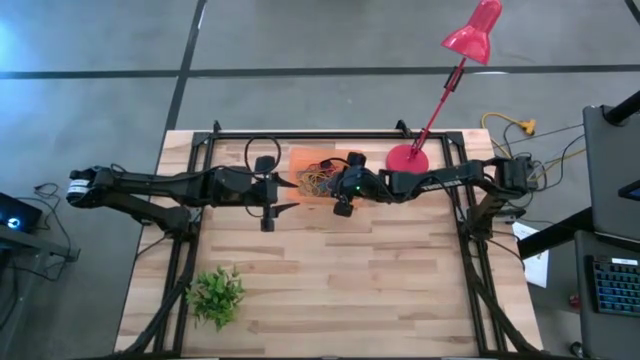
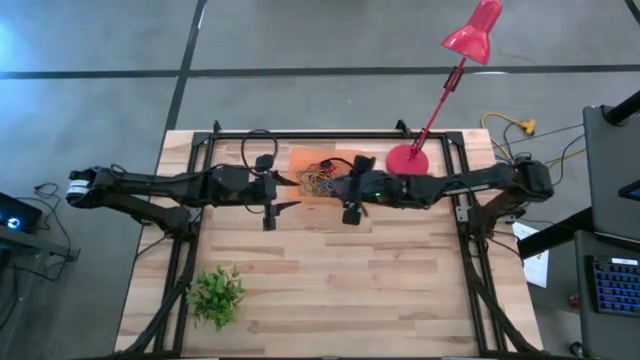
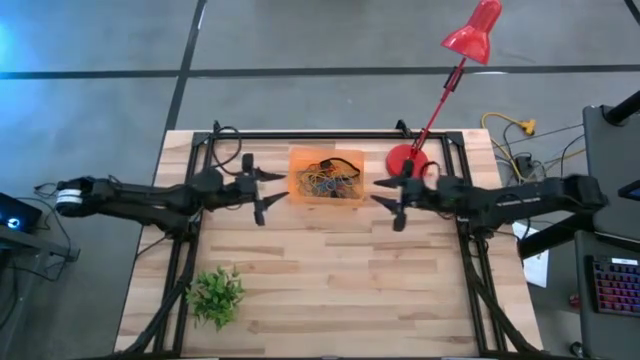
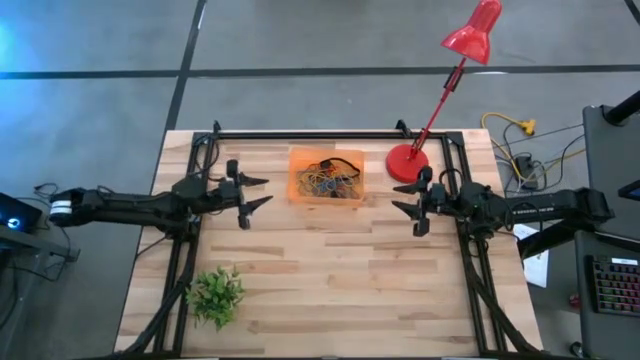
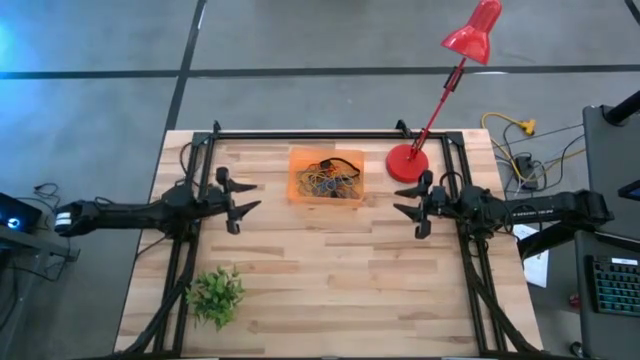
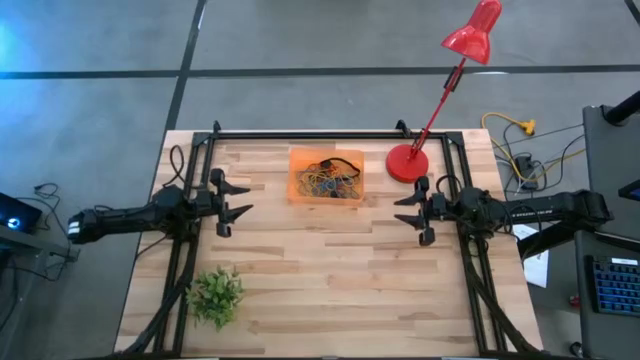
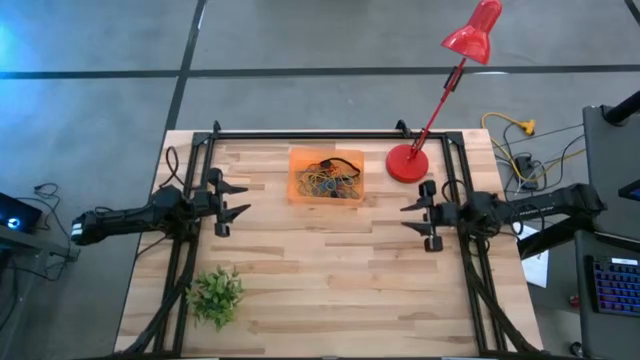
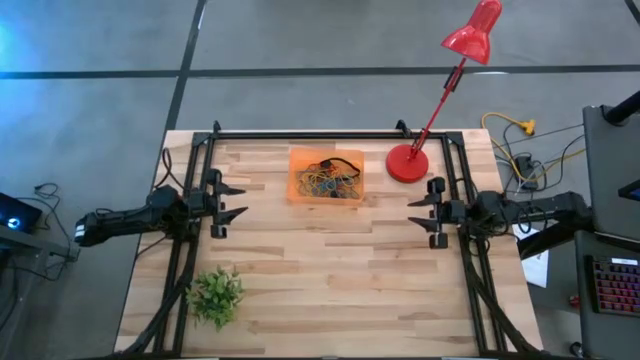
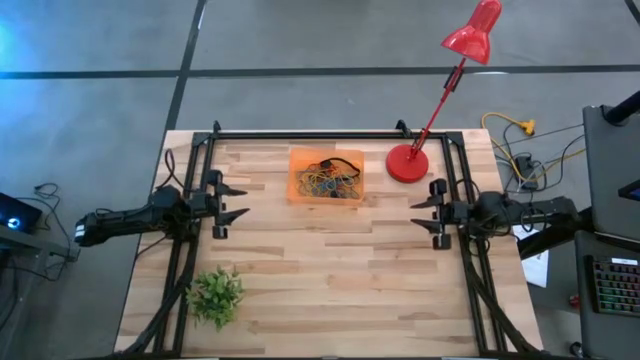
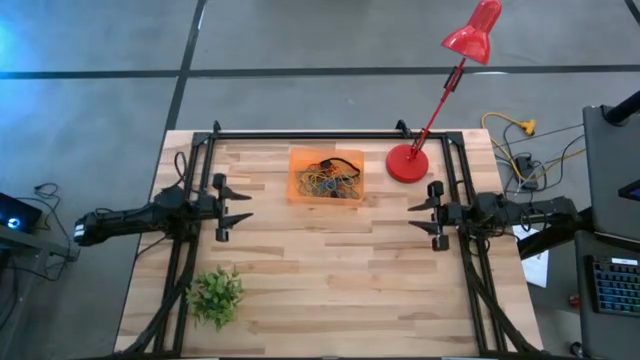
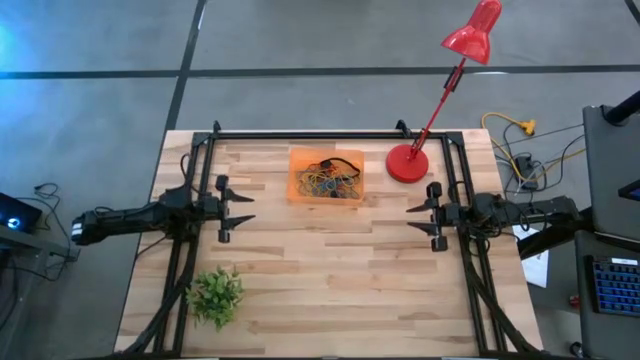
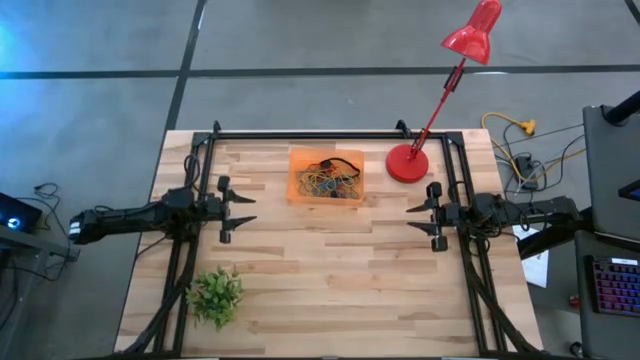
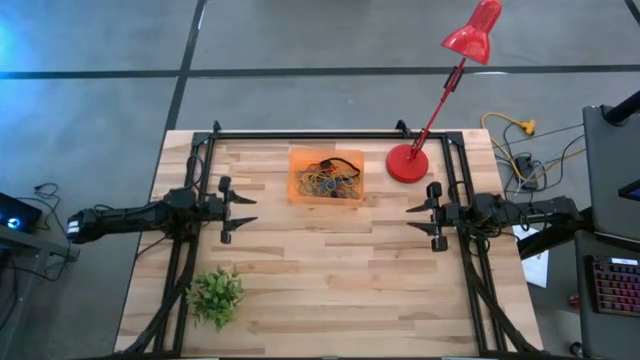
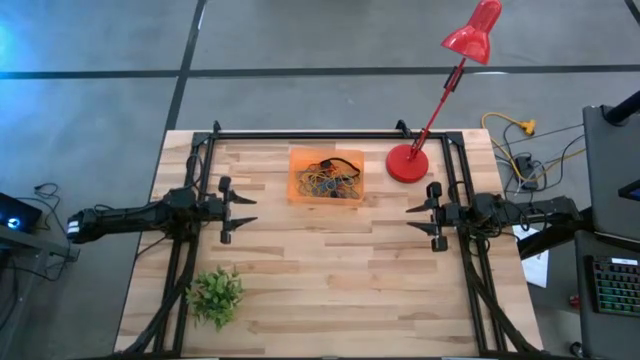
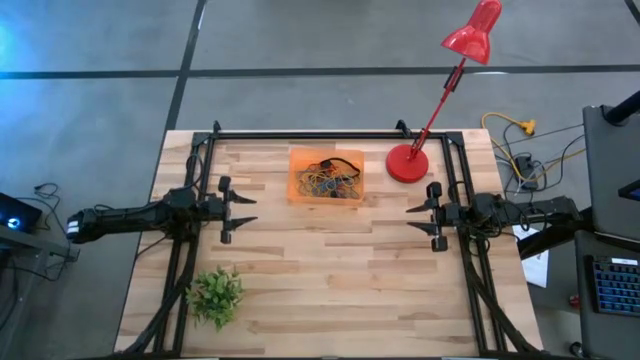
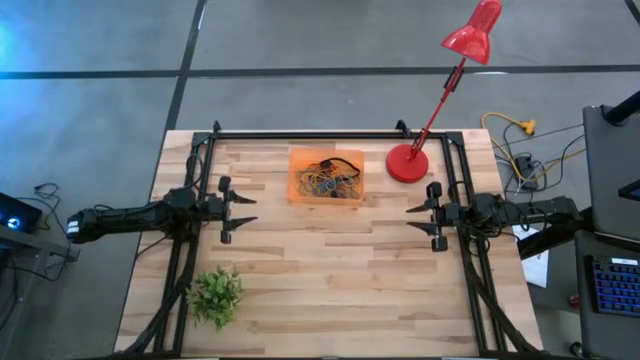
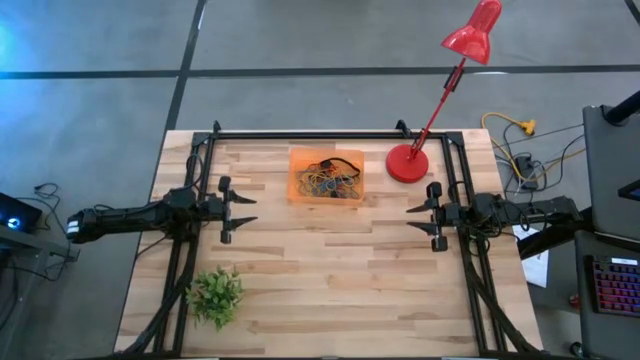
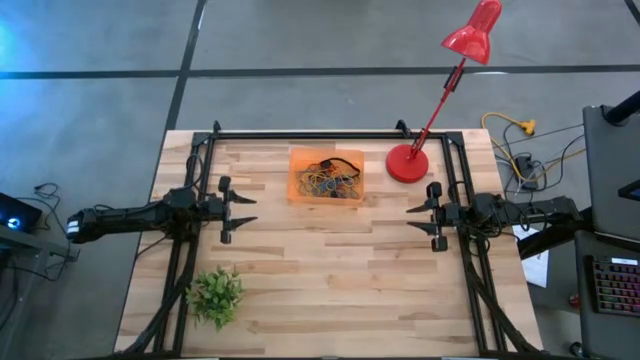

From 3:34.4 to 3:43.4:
Task: Pick and place rubber bands into bin
Return to Home position

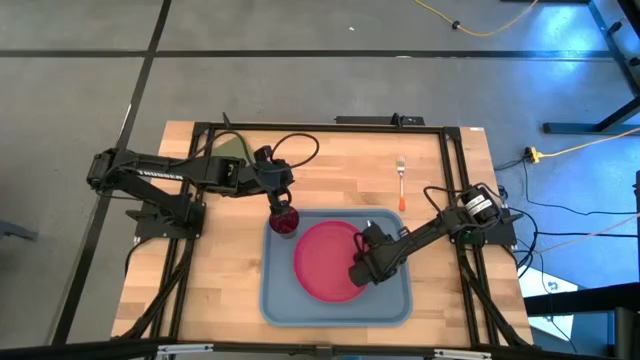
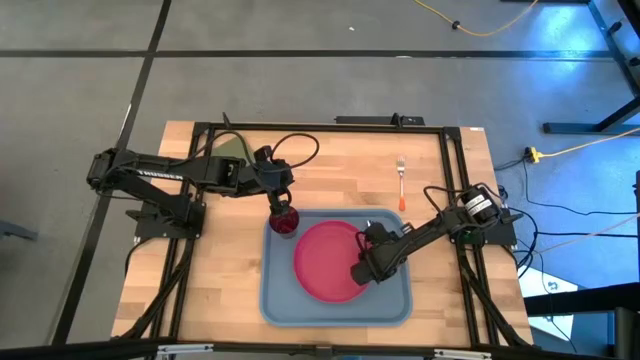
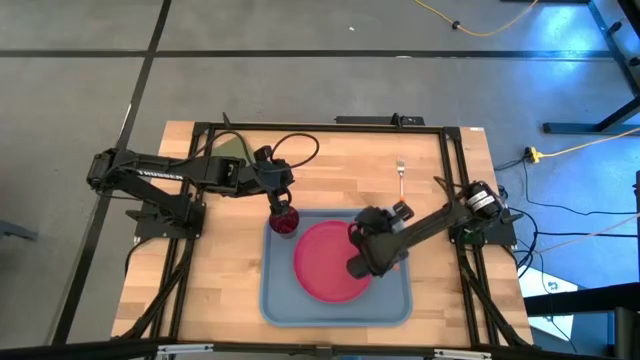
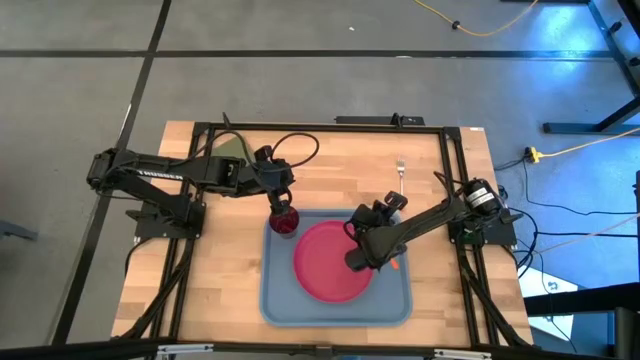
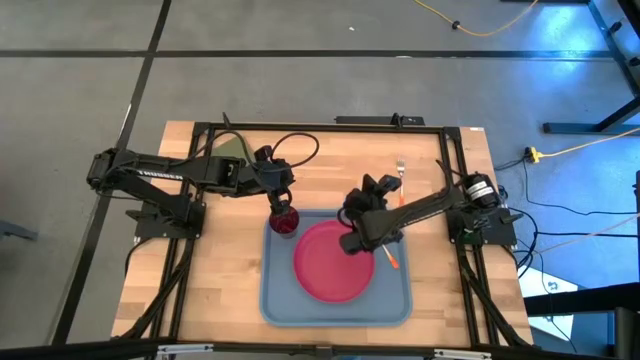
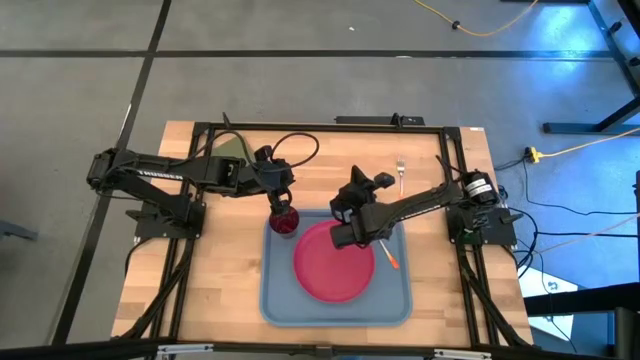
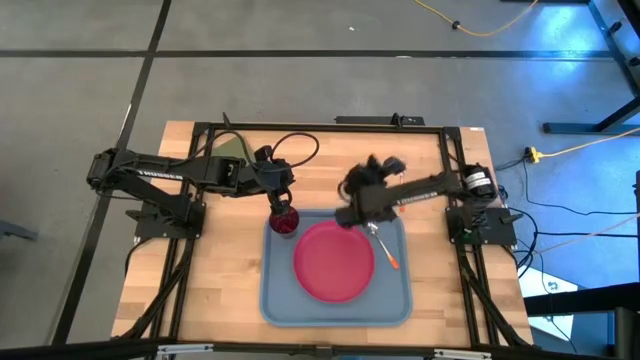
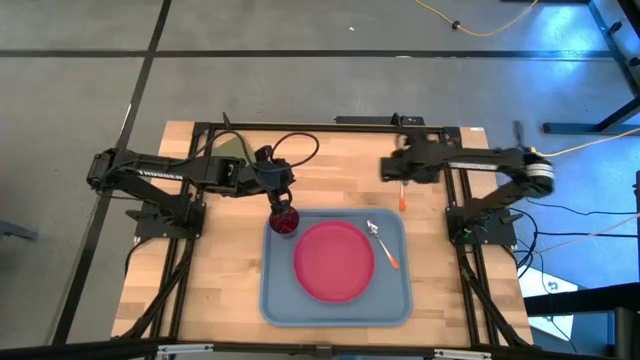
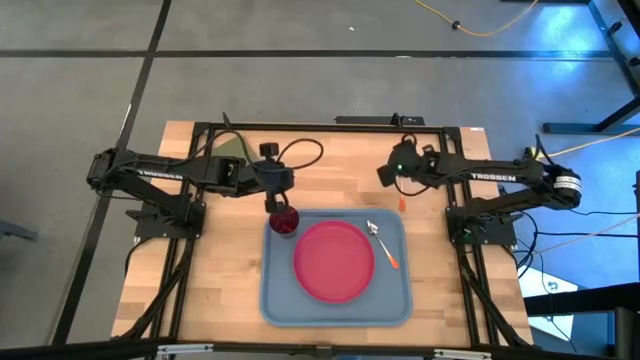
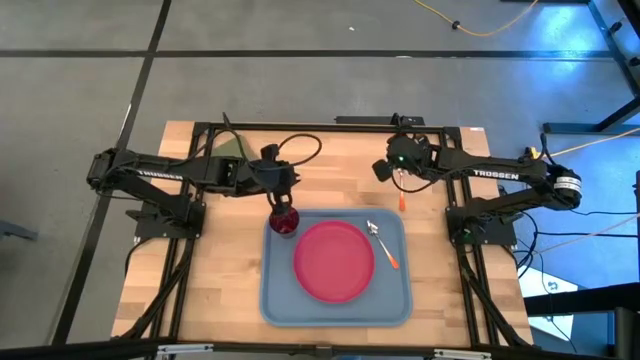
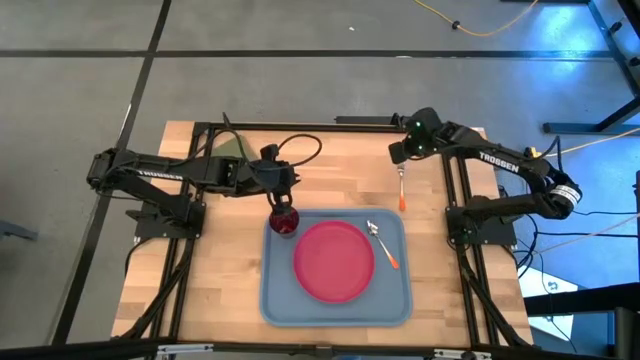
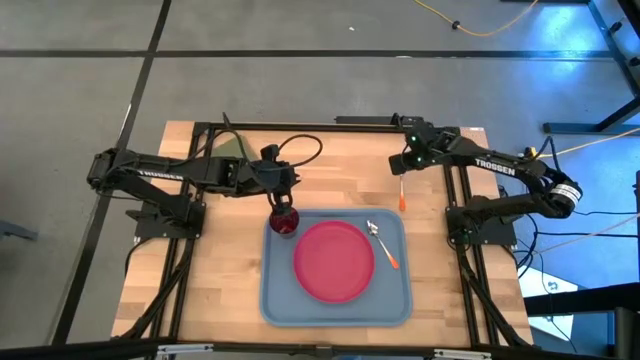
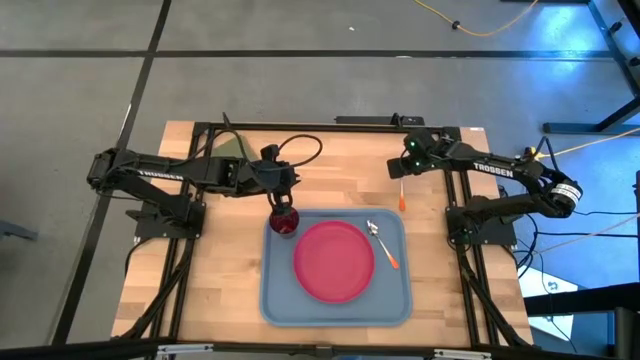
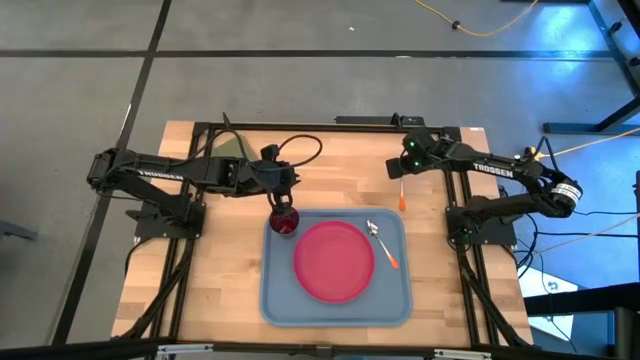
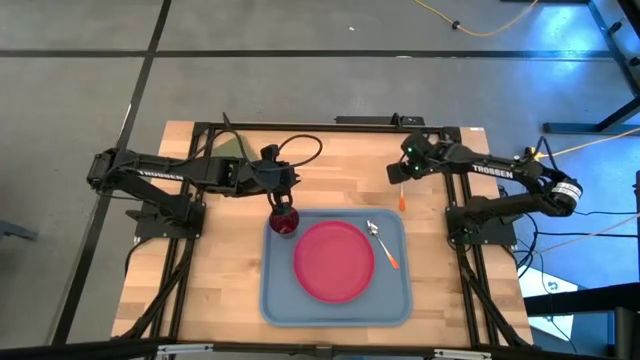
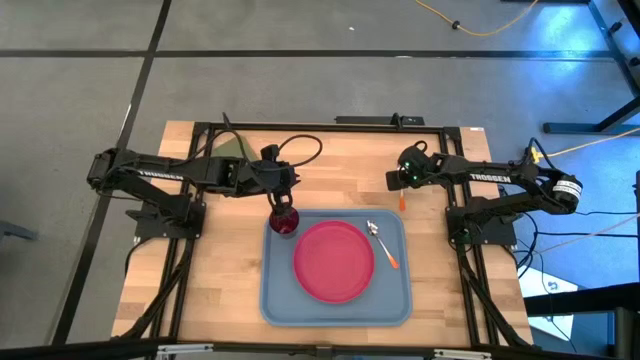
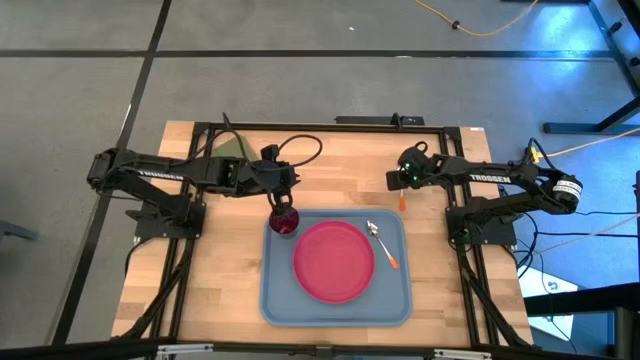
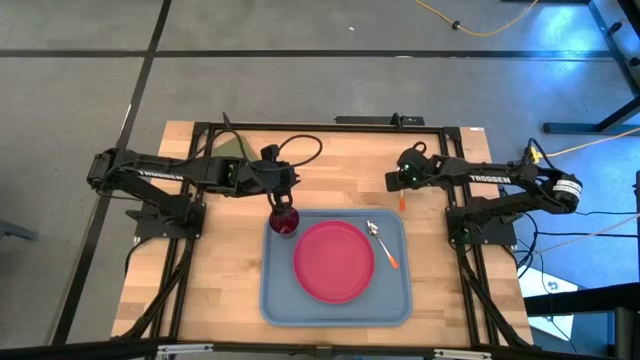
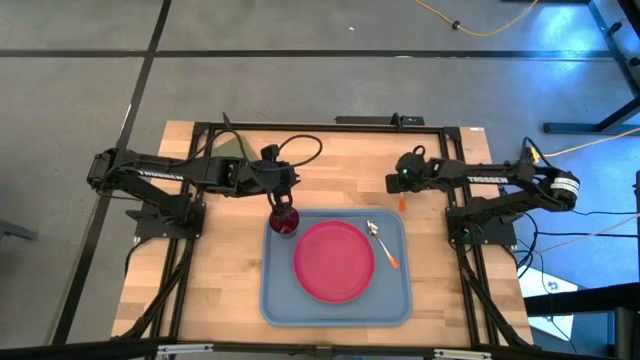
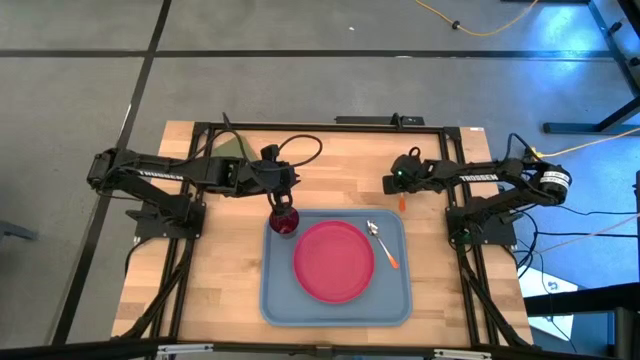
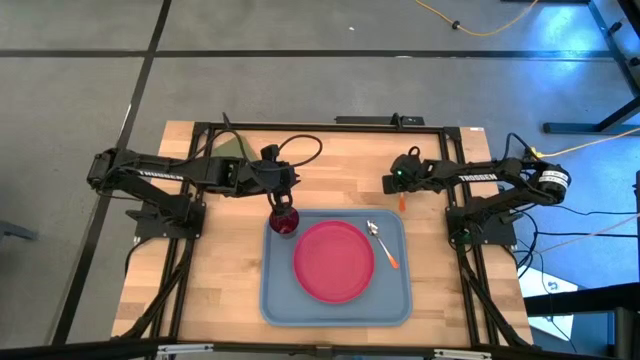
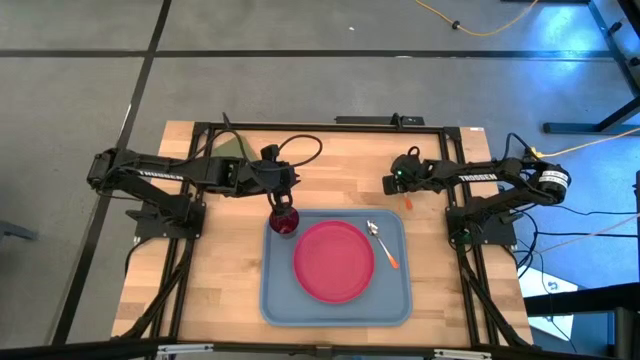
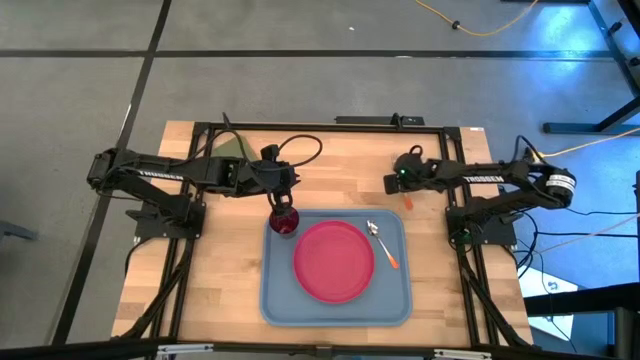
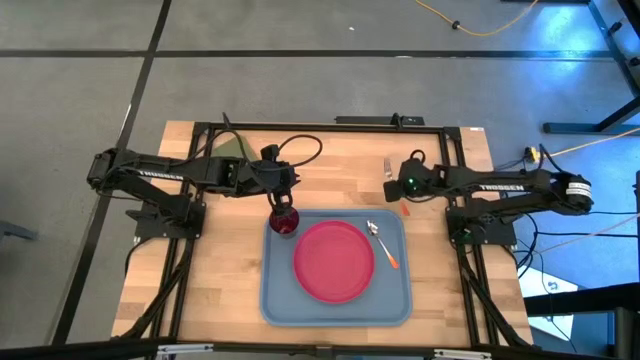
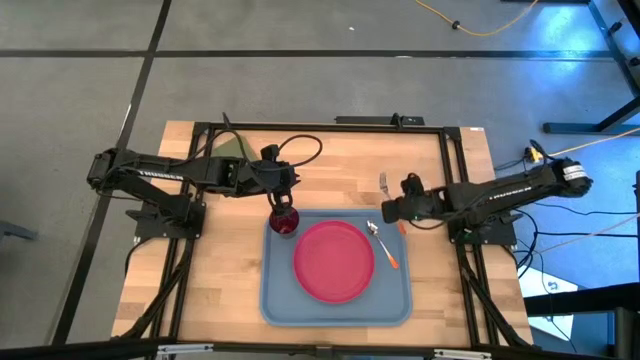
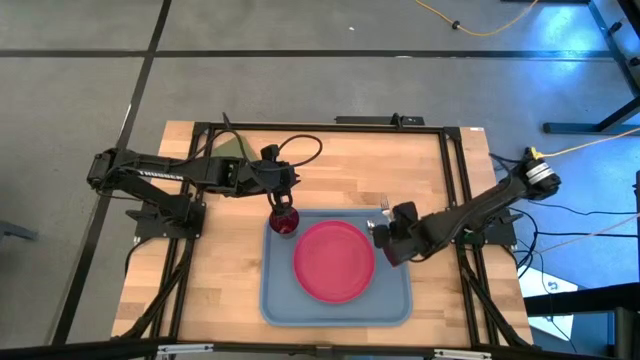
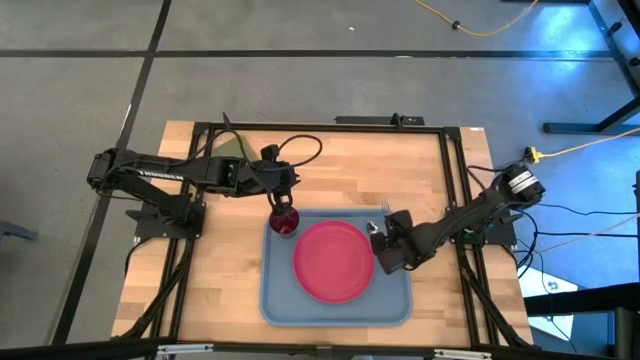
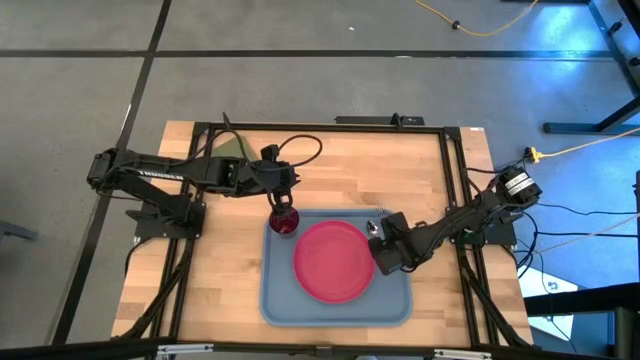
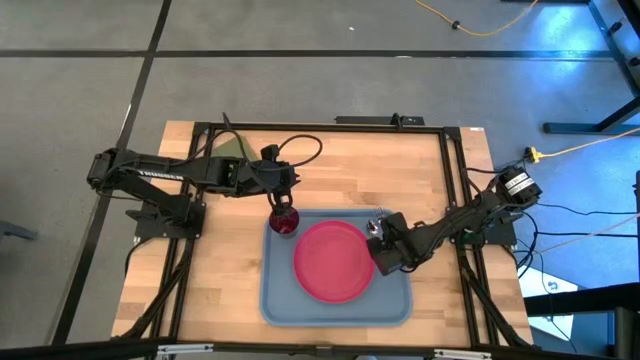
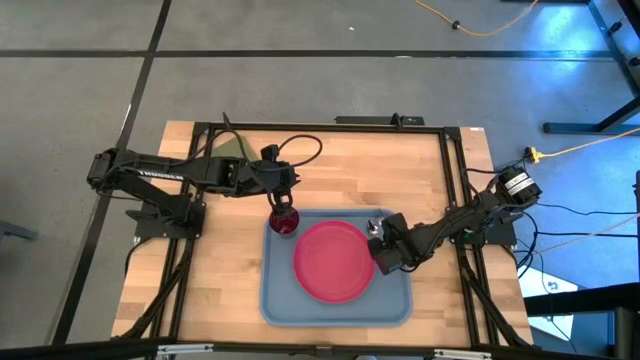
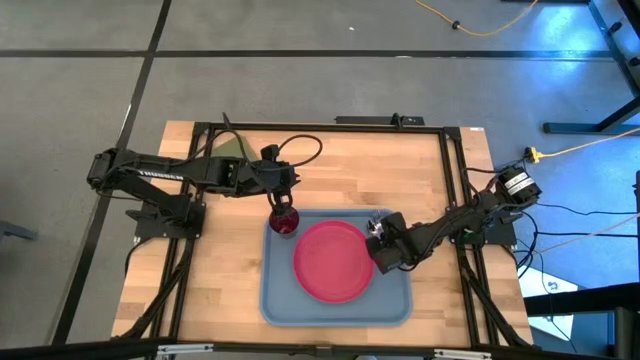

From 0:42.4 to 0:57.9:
Task: Pick and place plate/cup/fork/spoon on tray
Put the orange fork on the blue serving tray to the right of the orange spoon
